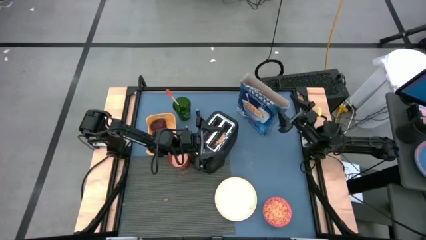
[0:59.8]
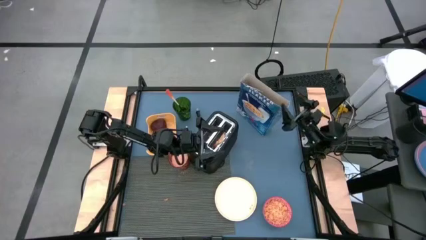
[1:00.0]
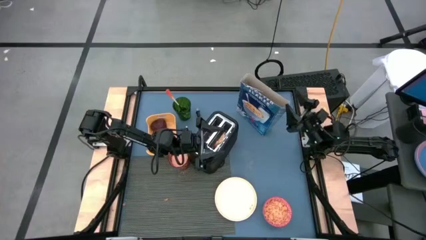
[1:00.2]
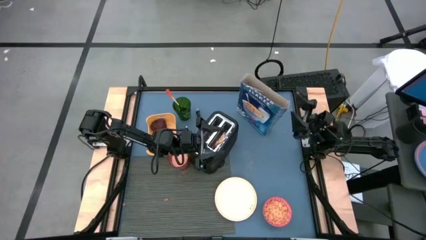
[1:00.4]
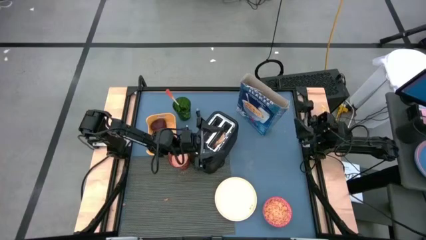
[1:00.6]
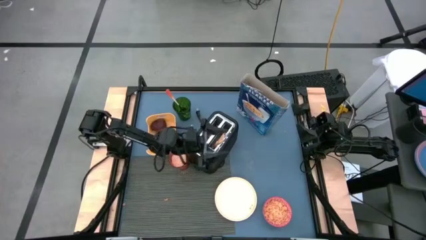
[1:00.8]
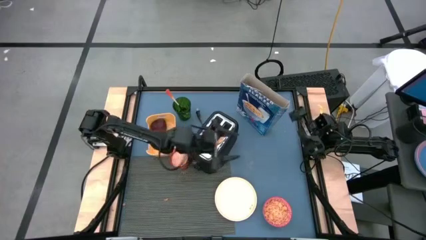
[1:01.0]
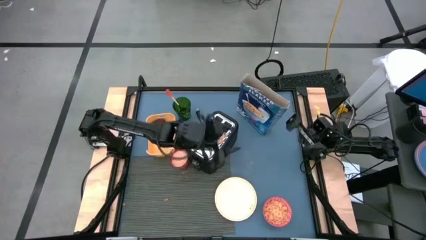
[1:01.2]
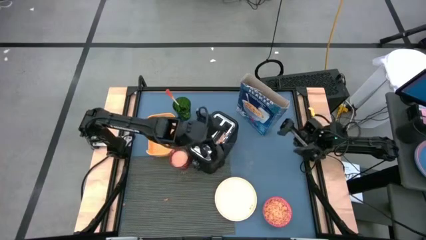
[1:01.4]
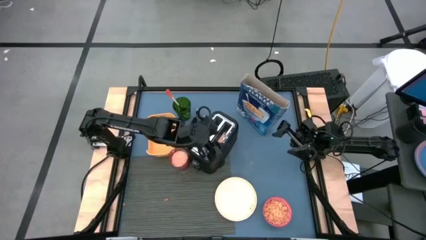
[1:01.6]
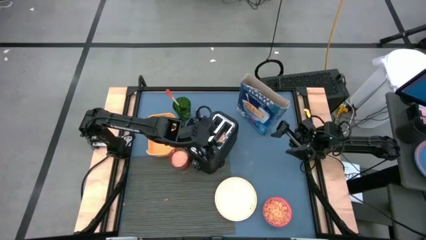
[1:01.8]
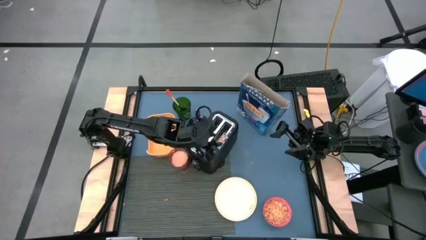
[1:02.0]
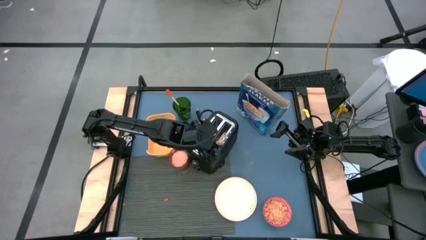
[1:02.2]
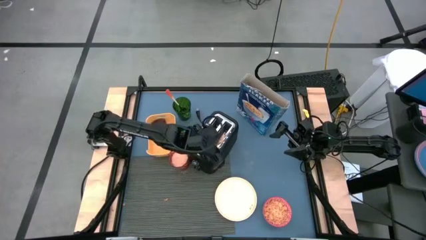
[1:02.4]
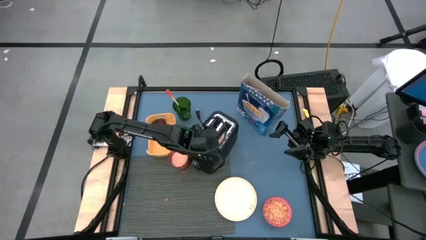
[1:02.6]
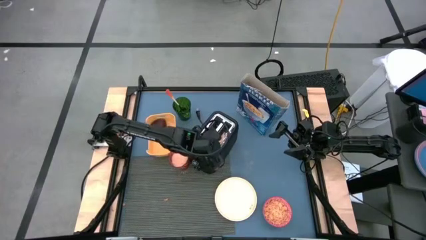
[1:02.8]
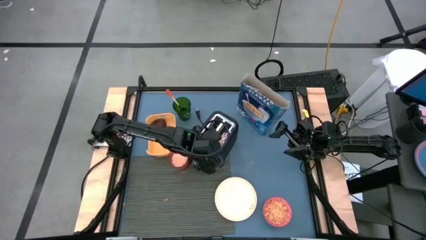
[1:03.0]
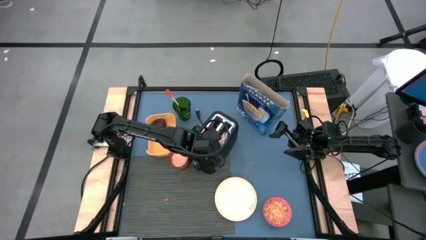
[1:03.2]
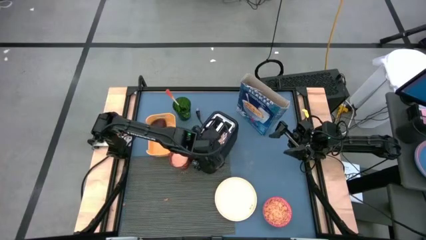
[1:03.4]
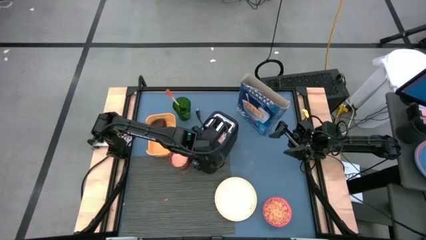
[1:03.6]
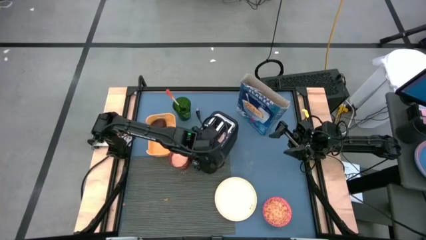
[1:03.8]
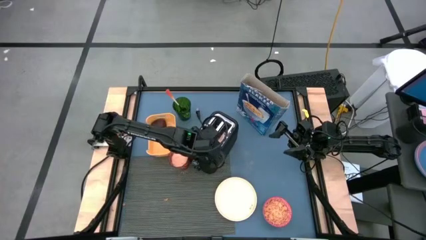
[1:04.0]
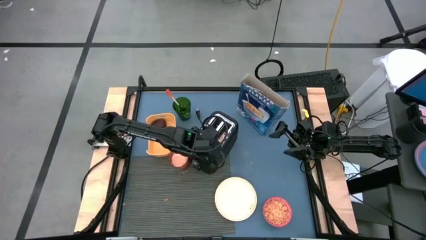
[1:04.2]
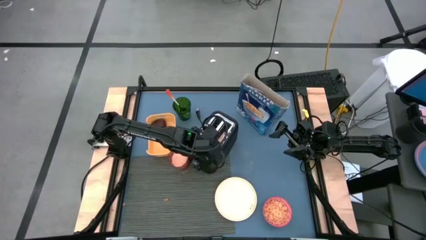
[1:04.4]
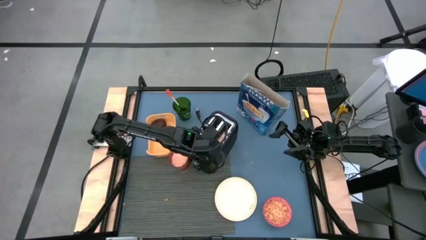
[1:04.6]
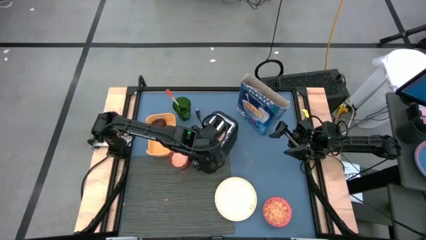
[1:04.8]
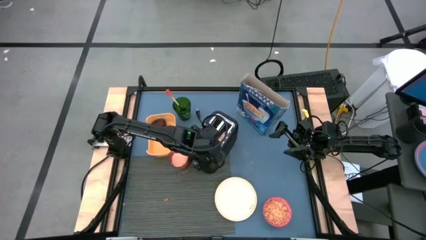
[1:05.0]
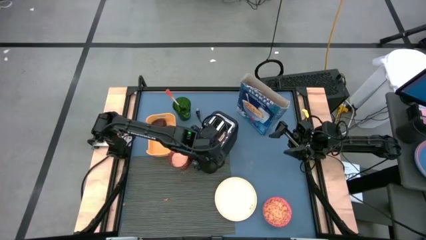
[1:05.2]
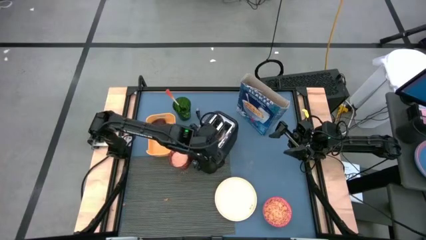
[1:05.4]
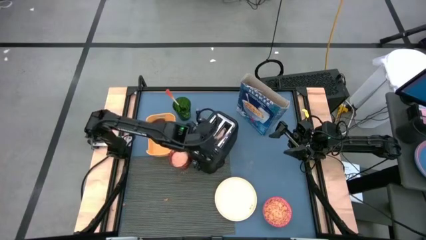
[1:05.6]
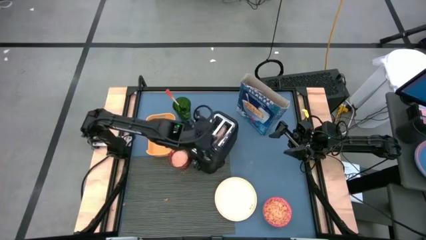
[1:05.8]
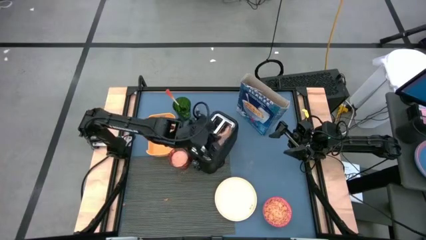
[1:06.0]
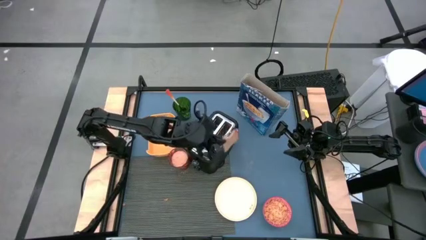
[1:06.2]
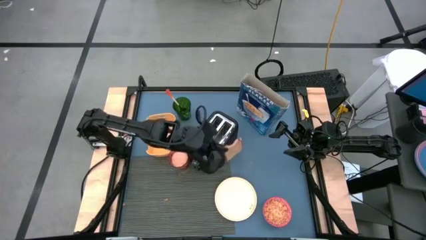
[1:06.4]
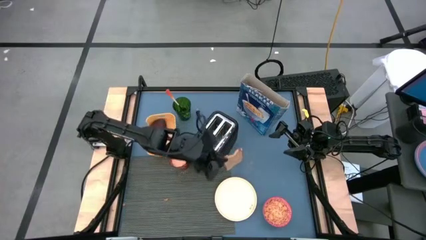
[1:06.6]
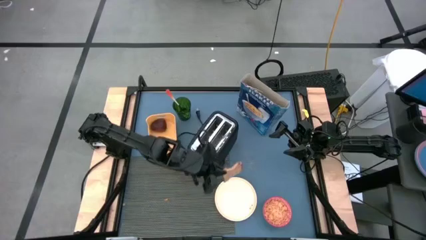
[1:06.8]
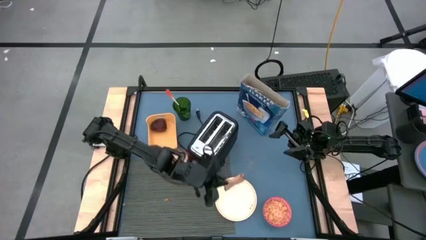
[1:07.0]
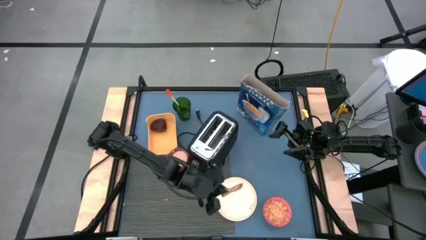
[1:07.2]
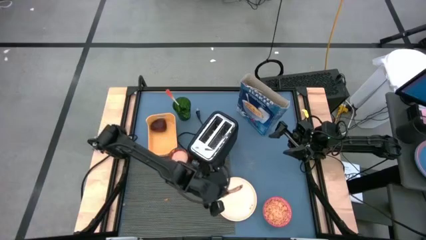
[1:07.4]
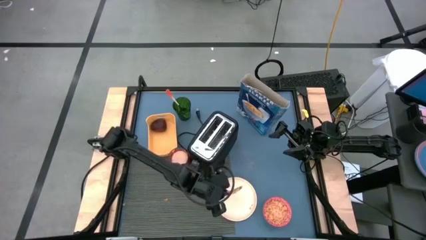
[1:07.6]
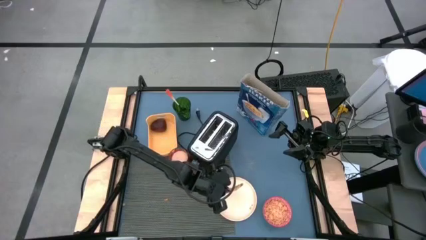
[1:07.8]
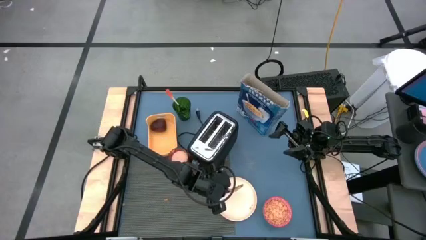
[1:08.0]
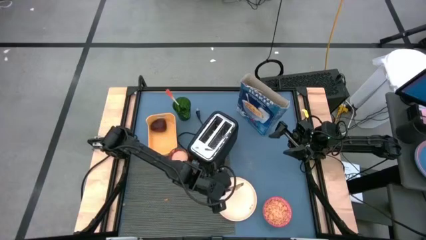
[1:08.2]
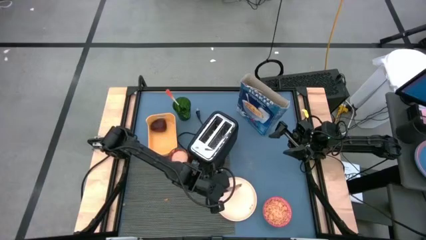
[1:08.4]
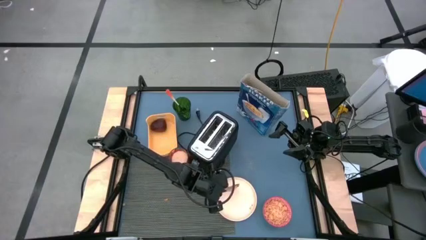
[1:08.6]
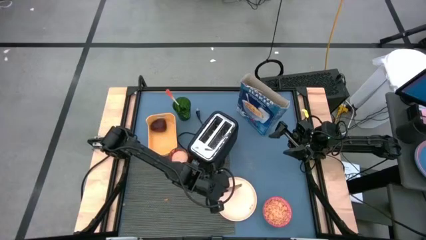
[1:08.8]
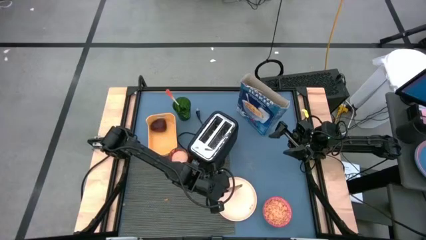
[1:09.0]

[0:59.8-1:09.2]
Task: Arrange a breakfast setting
Put the toasted bread from the toaster on the light orange plate

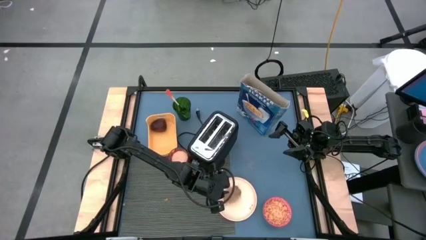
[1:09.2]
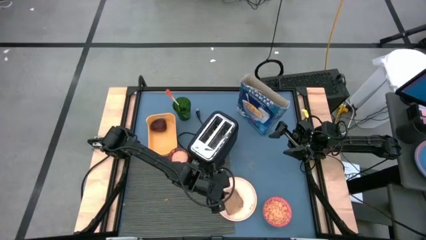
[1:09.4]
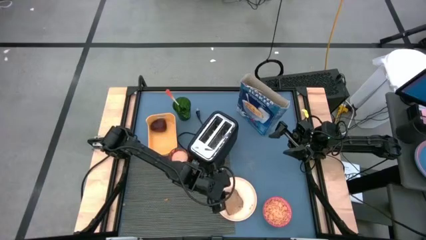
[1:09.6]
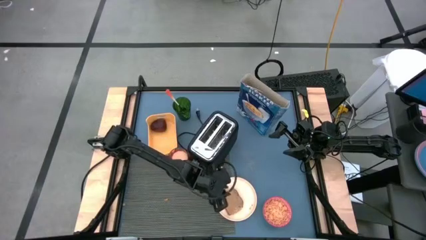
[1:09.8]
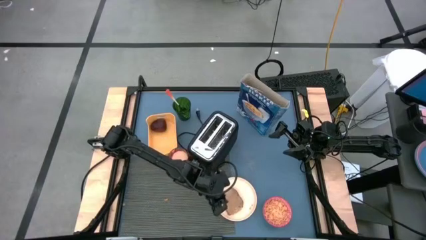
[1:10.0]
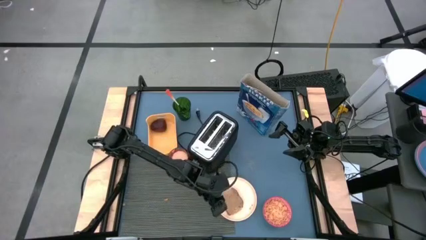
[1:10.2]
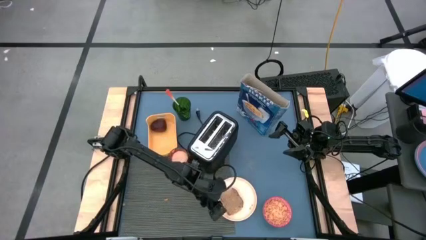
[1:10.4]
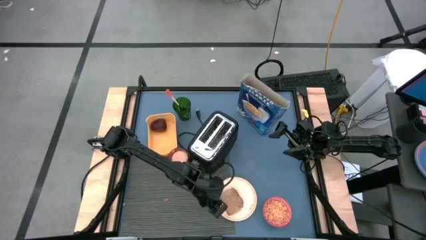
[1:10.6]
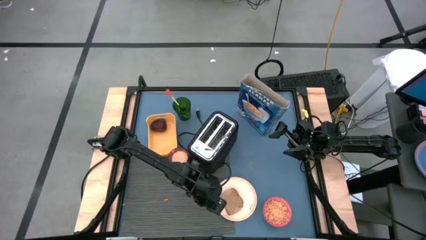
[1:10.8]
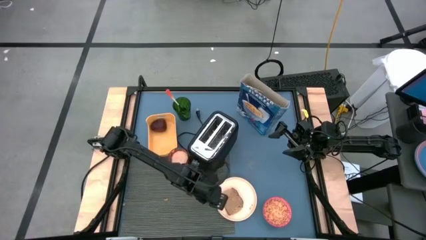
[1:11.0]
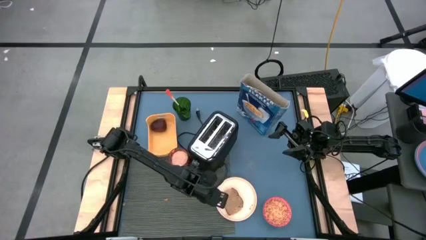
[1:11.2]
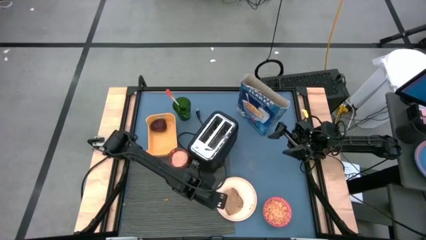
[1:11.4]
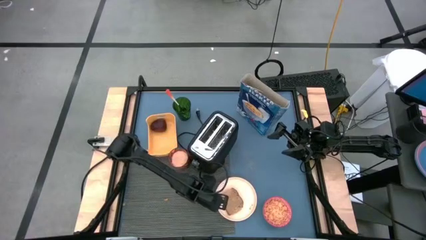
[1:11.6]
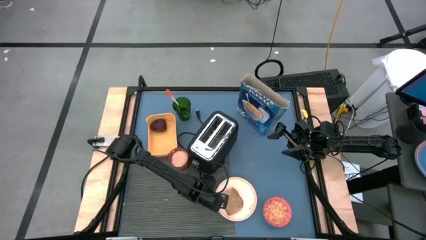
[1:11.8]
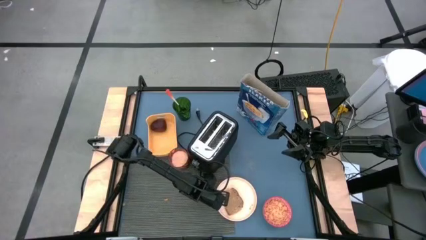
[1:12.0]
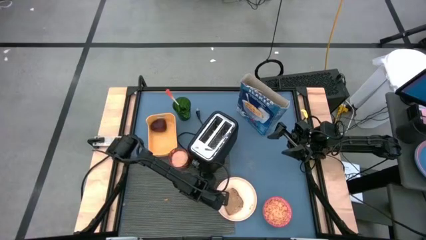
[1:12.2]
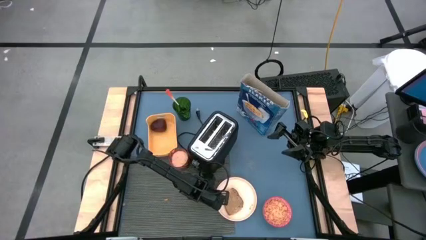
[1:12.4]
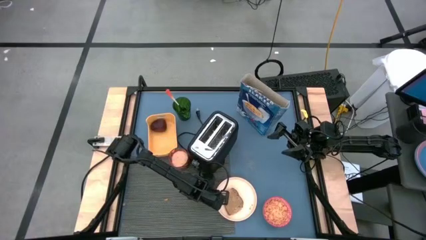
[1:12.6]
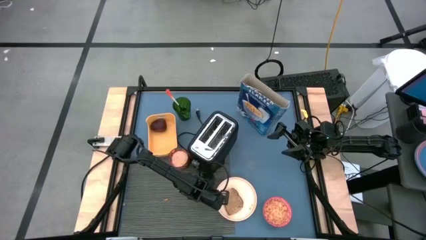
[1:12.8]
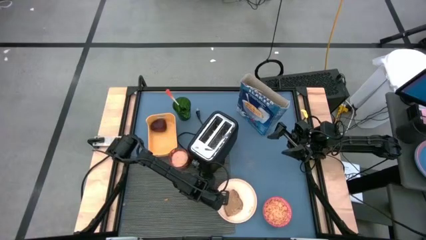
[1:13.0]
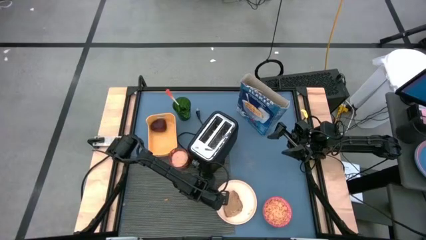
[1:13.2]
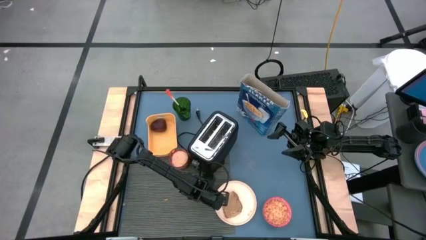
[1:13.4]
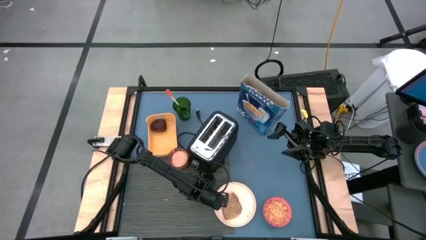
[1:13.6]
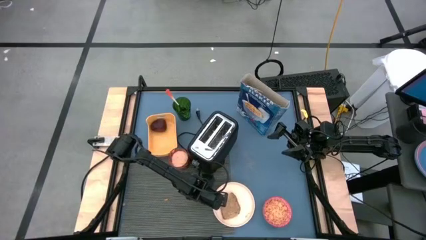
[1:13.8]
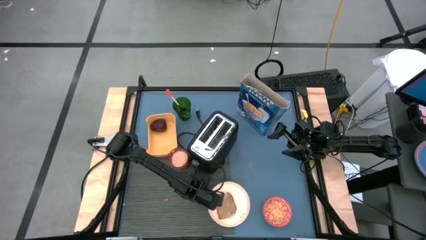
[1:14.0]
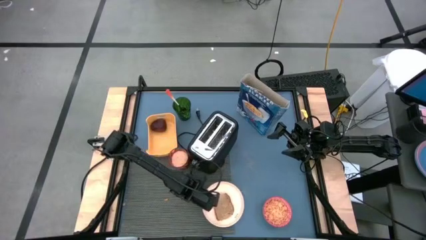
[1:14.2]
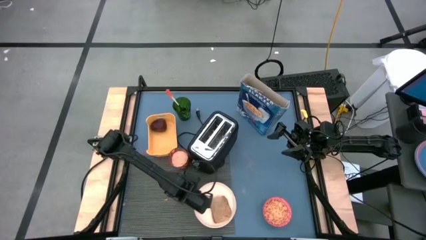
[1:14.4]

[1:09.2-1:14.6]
Put the light orange plate to the center of the gray tablemat
